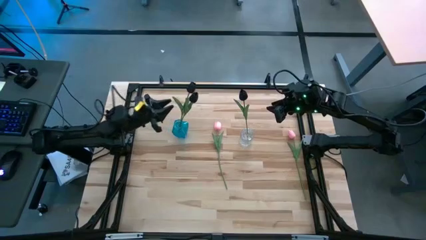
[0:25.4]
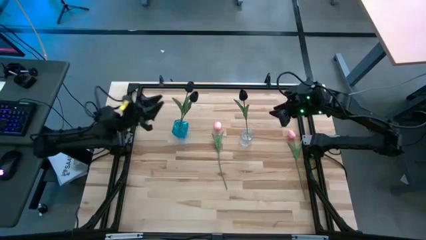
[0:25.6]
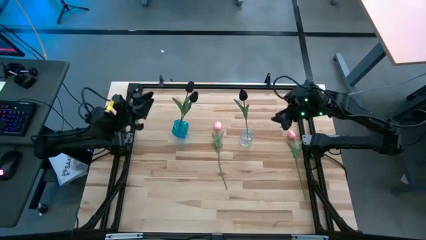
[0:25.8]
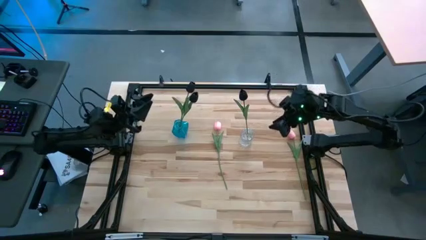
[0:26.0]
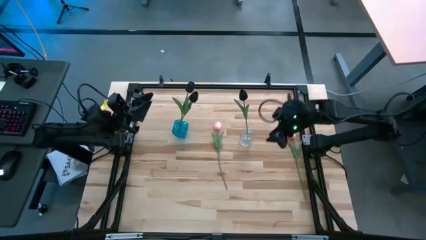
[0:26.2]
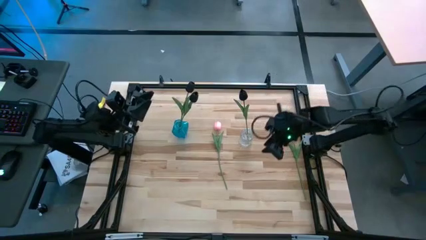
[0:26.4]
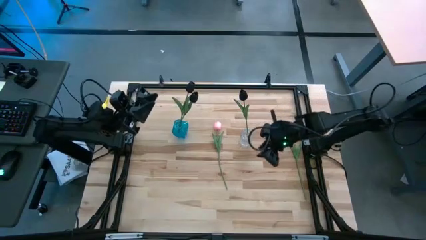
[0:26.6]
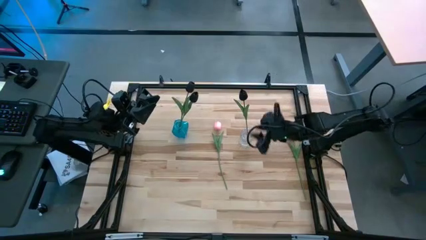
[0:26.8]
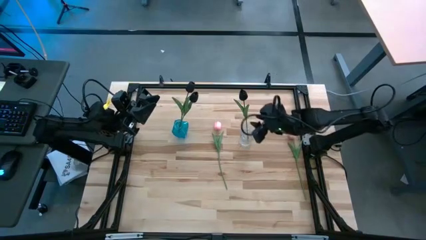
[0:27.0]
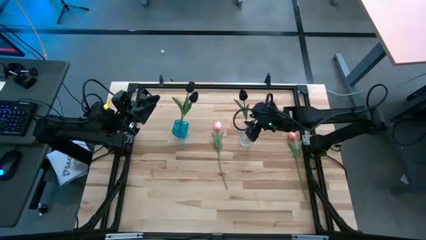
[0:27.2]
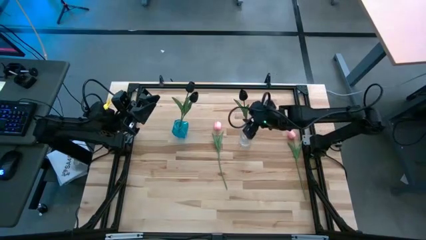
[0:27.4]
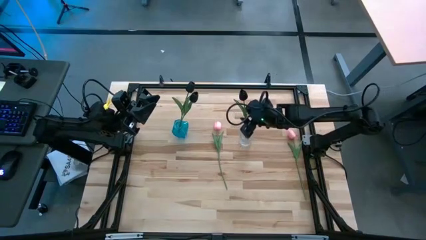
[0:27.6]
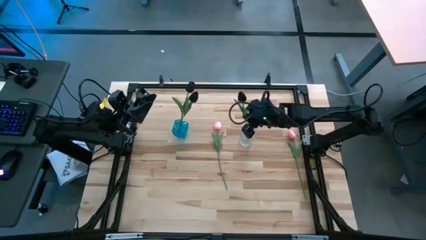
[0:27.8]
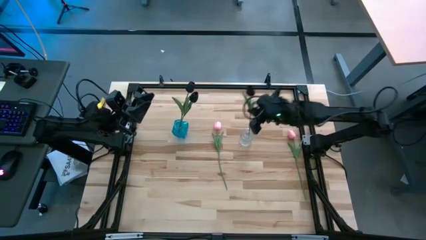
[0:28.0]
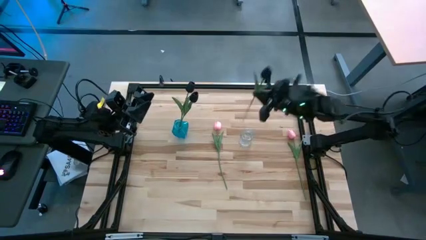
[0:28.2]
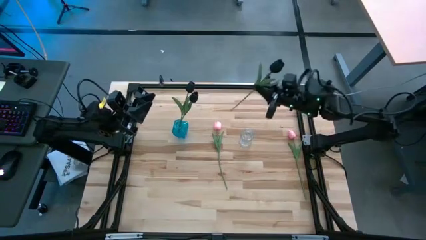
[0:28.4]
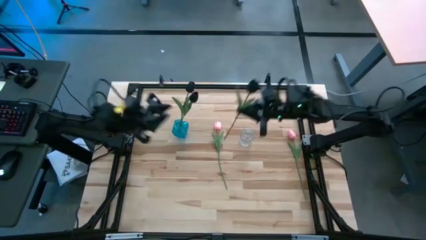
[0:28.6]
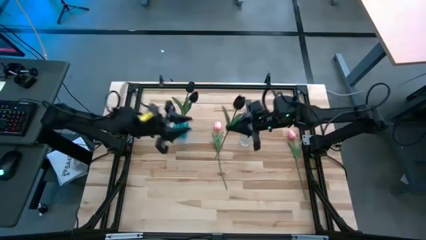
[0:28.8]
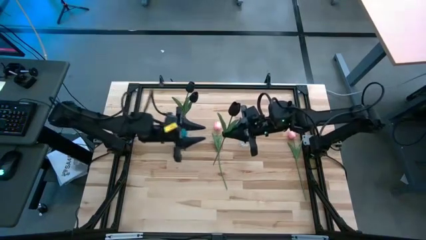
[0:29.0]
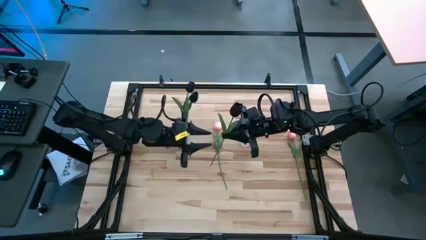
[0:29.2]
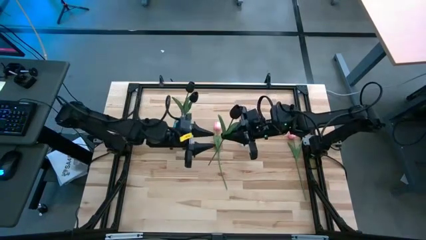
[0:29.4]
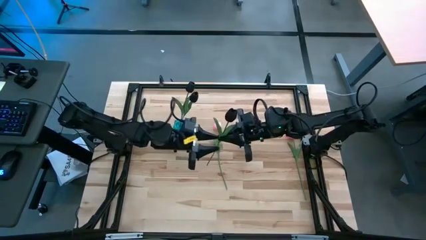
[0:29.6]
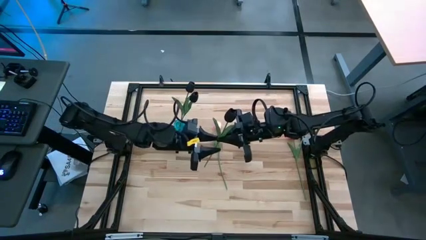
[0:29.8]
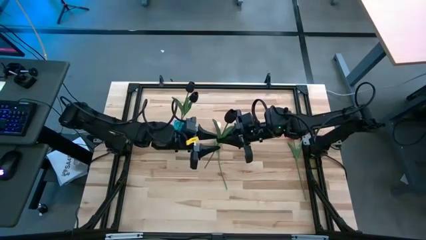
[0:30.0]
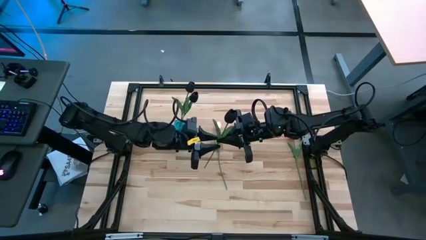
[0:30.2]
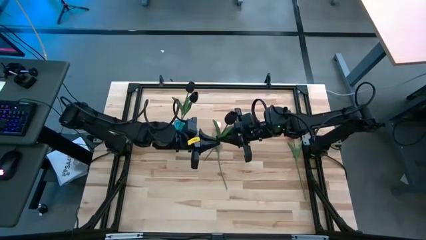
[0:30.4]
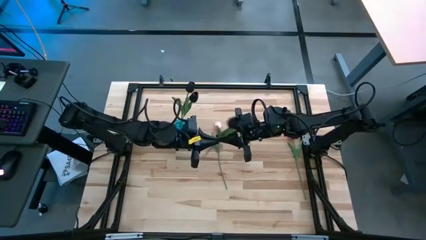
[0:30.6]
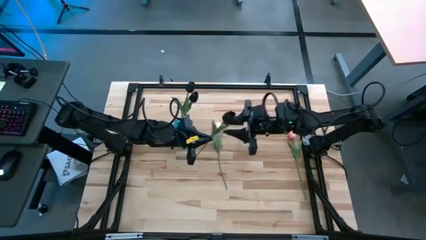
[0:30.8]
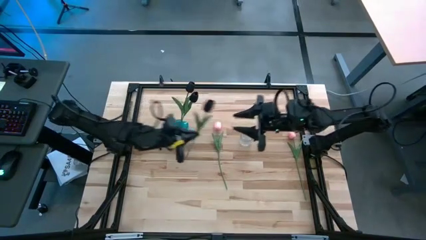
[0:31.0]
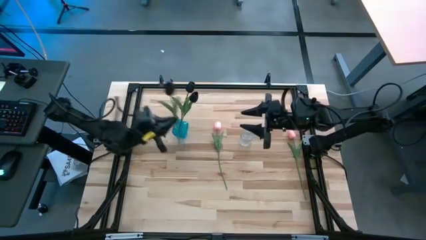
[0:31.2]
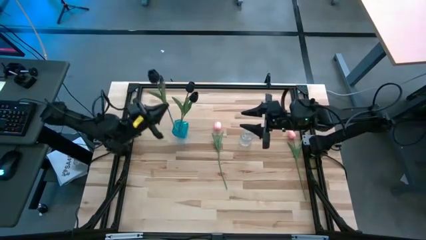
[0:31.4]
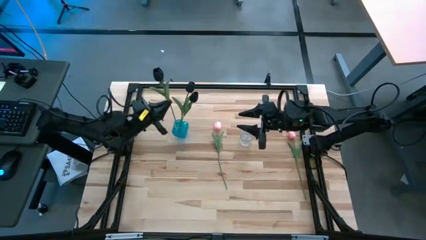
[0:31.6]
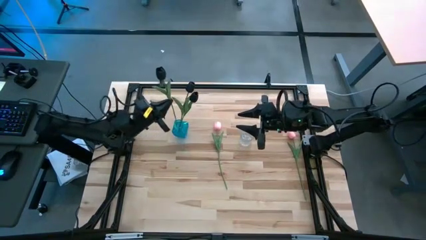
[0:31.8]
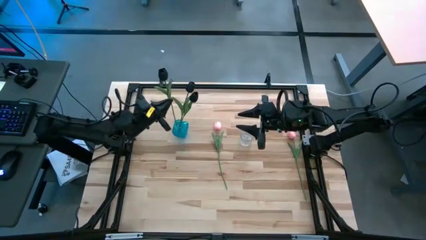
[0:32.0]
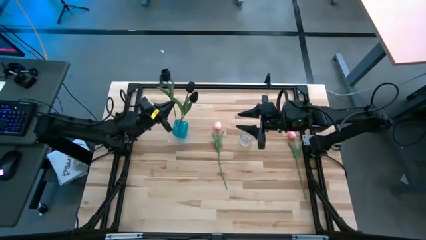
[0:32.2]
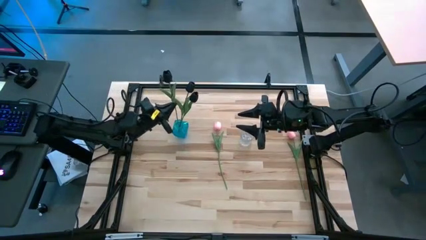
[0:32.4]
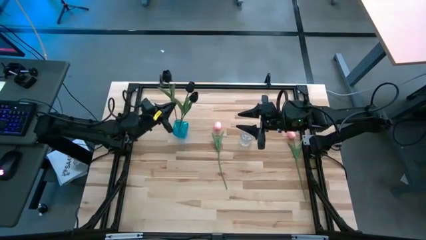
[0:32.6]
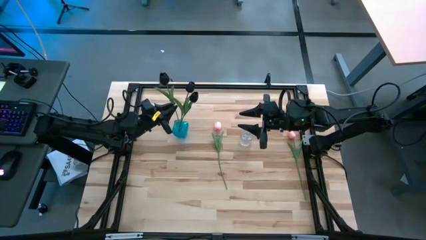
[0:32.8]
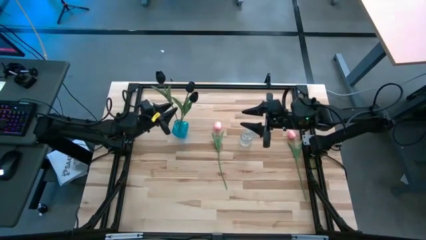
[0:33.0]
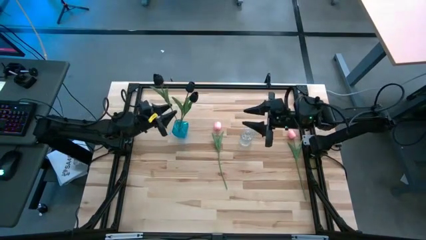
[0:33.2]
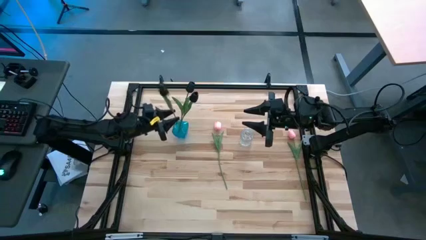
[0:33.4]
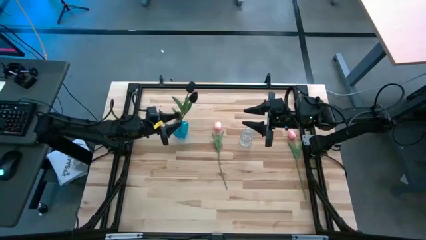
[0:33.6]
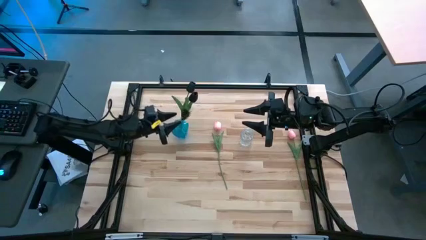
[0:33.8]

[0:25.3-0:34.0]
Task: Sort flowers into vase by color
Move the black flower from the transparent vase to the blue vase

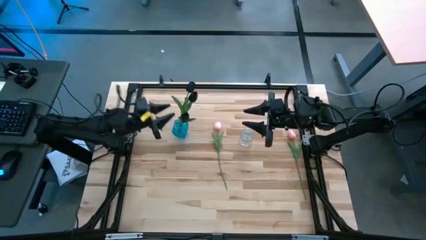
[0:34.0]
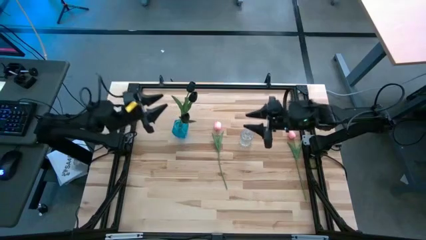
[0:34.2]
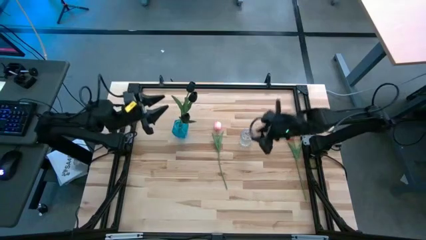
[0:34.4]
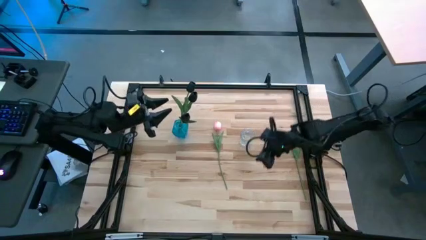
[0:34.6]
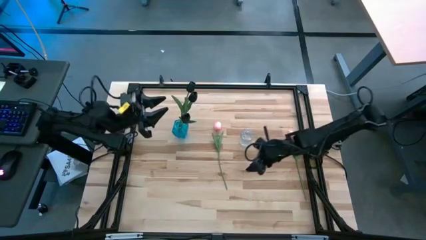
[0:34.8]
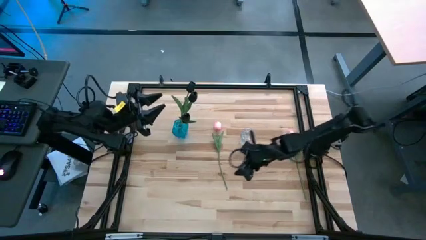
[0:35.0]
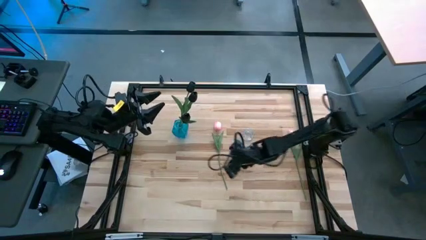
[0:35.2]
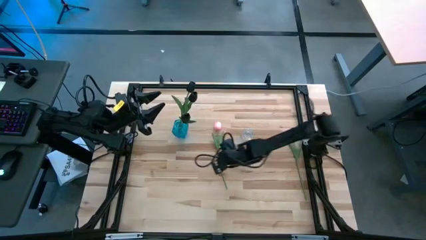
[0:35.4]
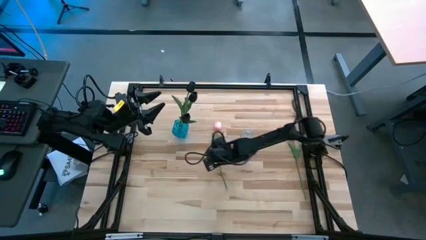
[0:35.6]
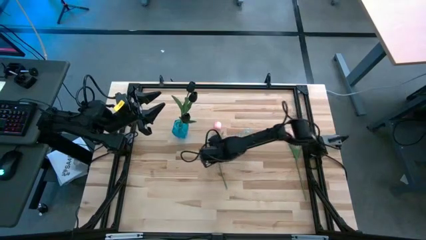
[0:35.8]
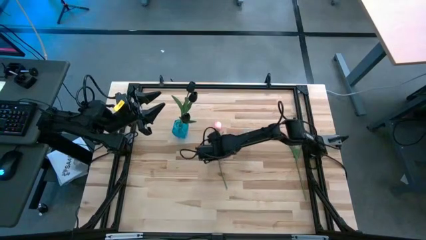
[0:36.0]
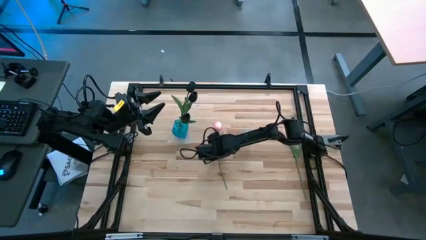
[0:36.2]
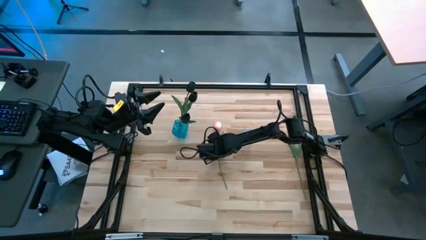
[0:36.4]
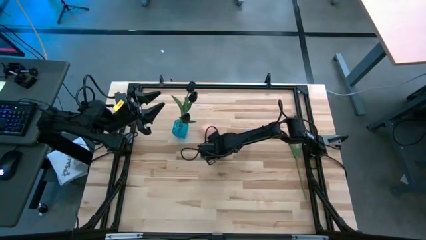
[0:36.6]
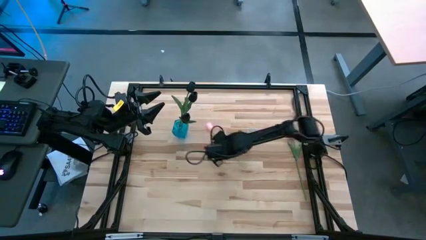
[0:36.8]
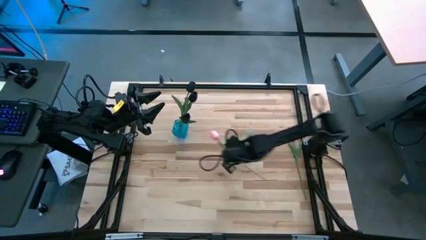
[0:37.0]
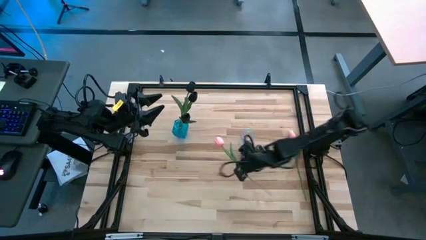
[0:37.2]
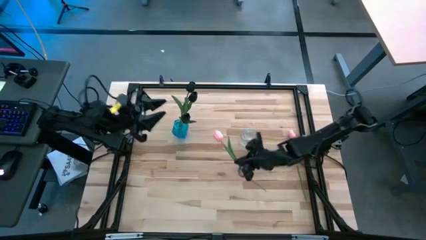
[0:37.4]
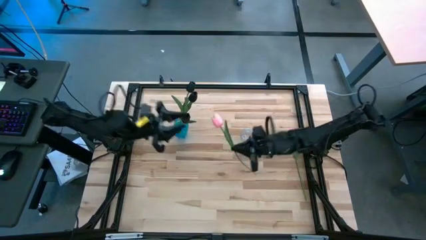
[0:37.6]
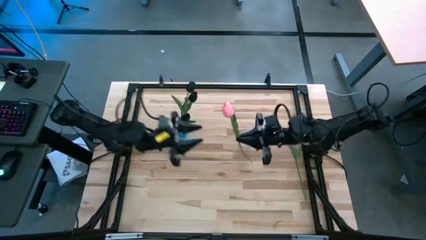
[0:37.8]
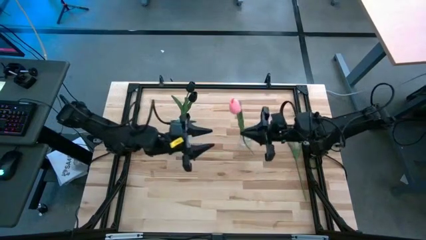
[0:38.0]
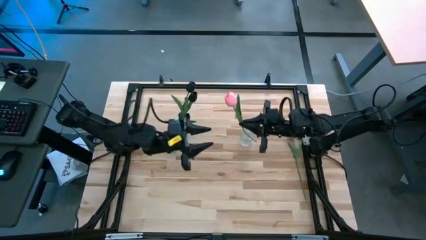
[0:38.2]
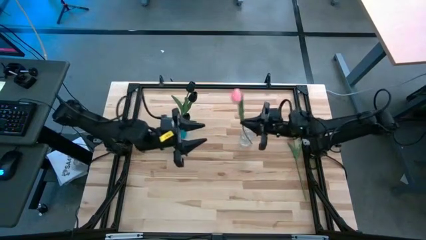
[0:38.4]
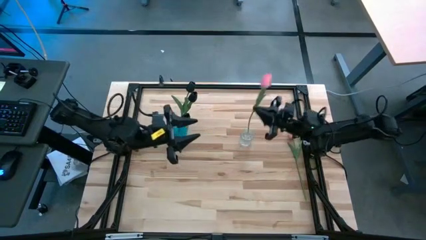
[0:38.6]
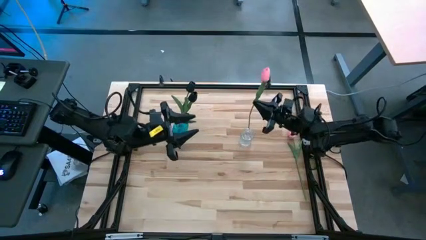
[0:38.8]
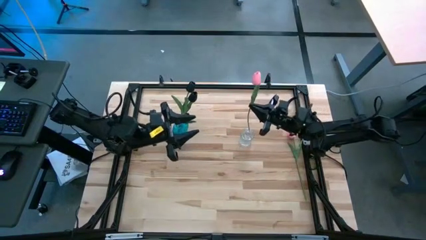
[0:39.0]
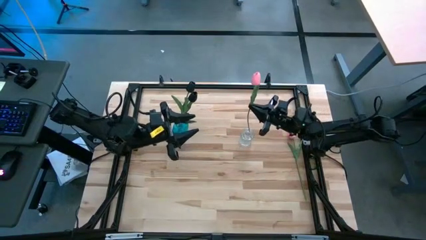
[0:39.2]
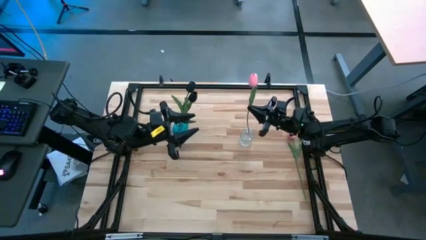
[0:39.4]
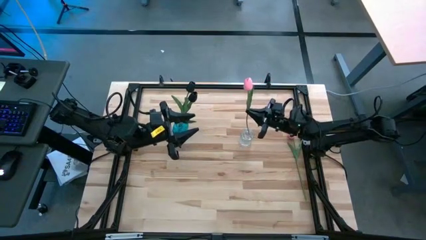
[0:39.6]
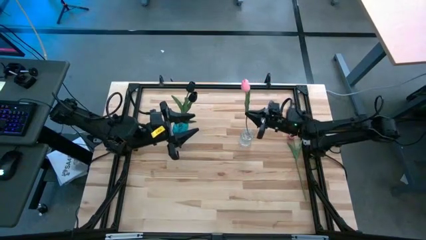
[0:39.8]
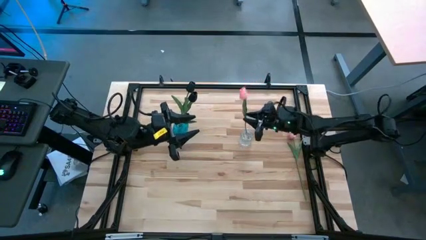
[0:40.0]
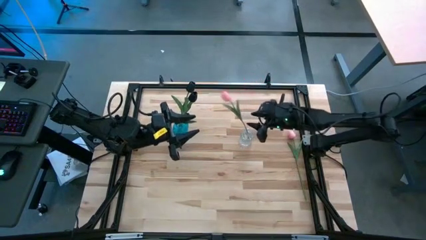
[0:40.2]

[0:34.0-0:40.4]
Put the left pink flower into the transparent vase
